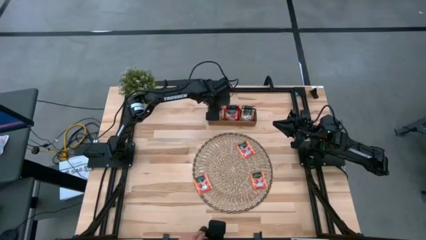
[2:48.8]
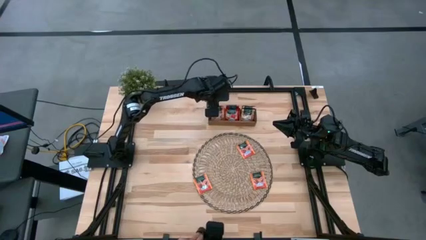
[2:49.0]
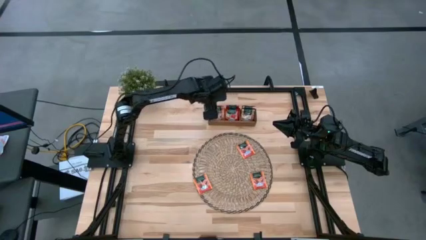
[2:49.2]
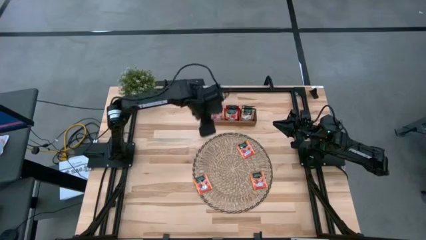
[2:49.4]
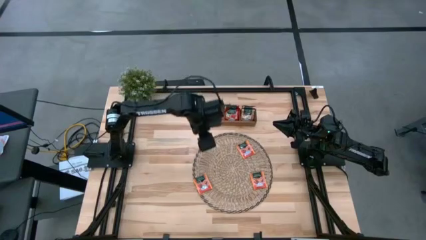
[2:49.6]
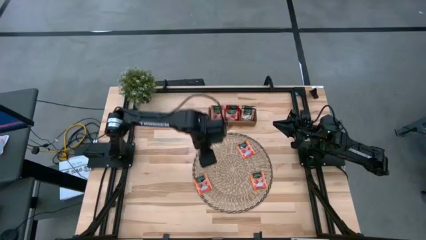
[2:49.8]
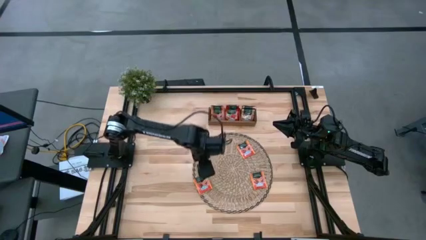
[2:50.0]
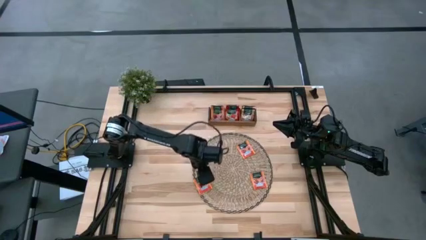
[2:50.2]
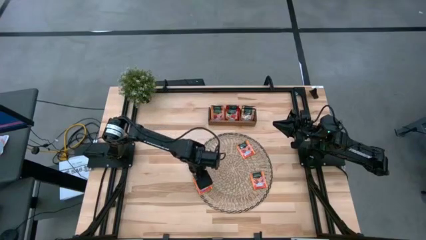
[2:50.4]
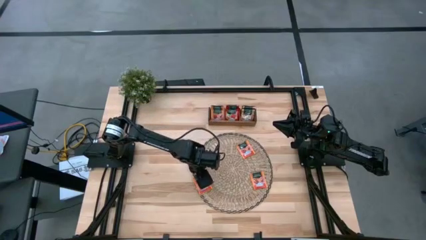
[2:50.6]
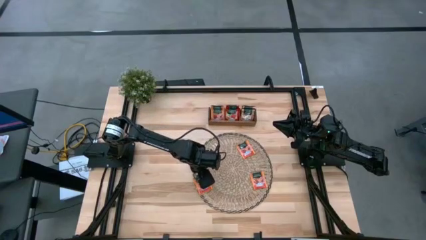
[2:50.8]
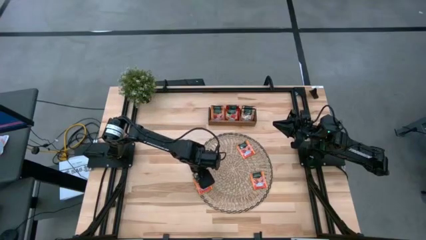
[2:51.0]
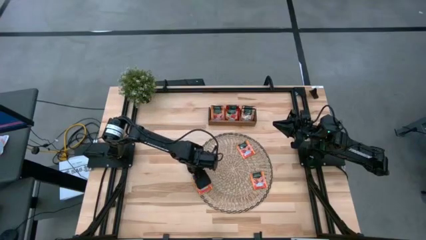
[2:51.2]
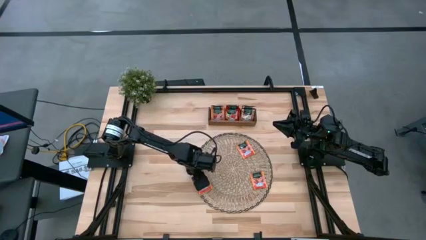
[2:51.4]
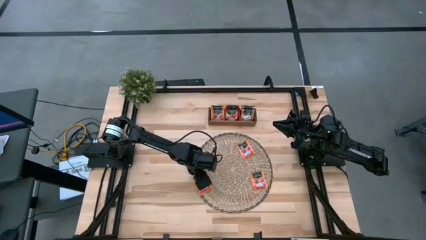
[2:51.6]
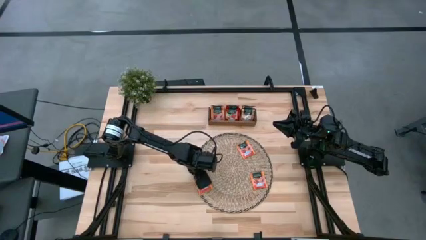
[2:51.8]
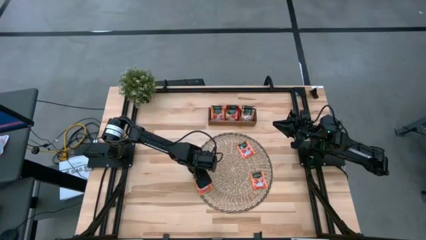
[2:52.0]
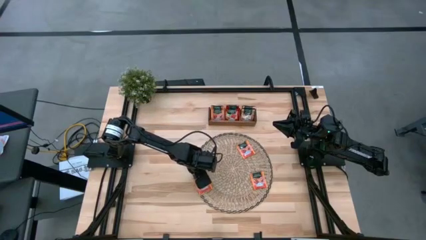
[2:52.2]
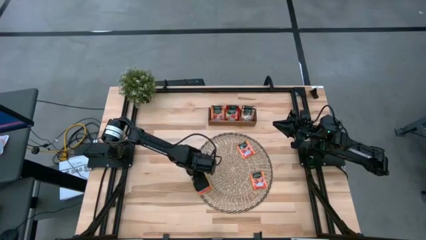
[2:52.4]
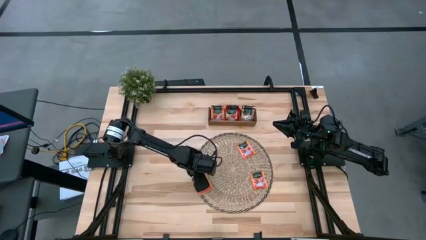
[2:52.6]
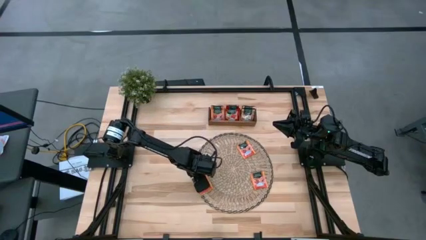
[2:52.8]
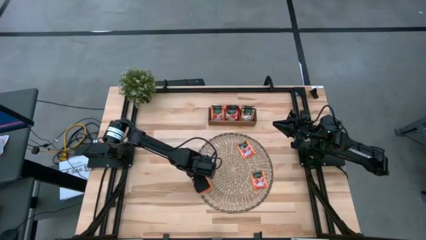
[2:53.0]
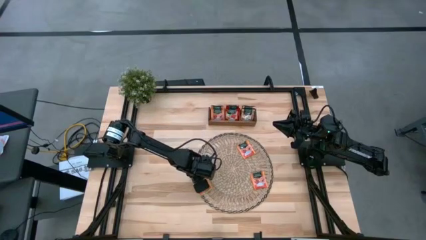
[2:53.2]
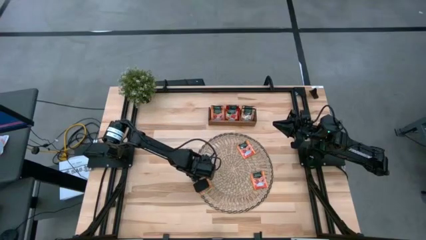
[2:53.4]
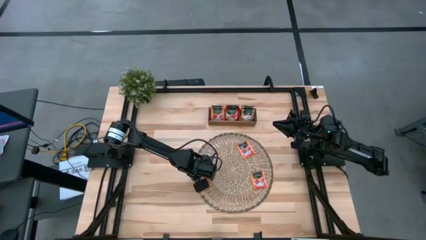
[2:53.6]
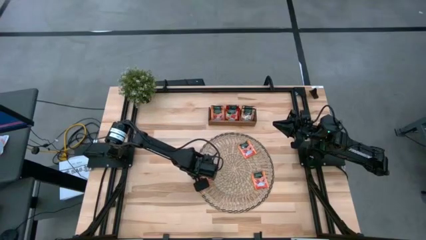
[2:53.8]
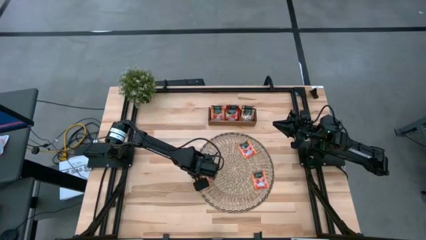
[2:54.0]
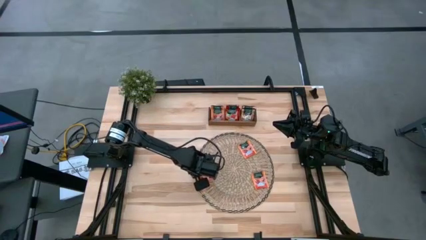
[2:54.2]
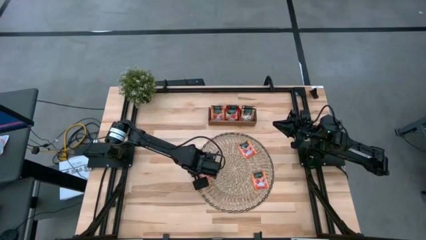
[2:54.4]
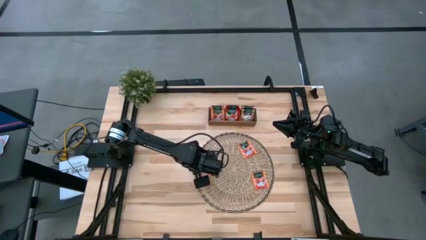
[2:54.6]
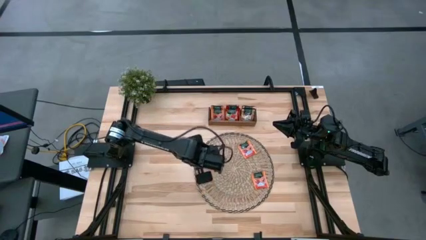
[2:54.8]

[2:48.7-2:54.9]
Task: Pick & Place Tea
Put the bottom left orange tea bag into the left section of the wooden organizer

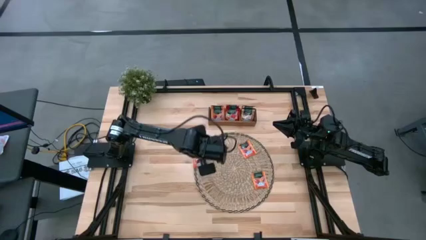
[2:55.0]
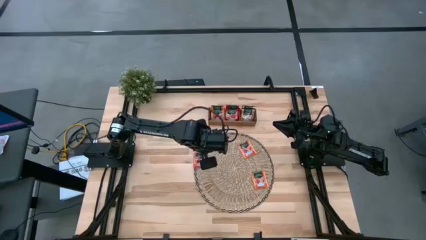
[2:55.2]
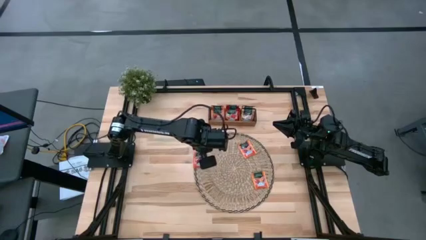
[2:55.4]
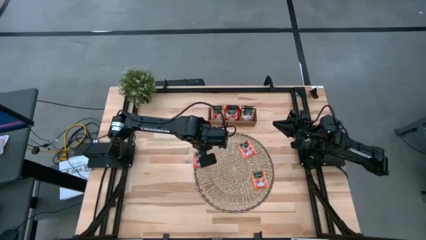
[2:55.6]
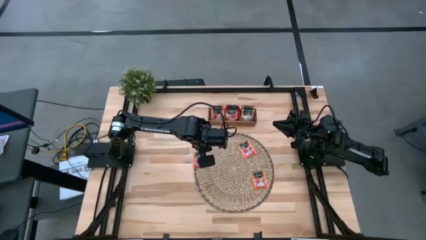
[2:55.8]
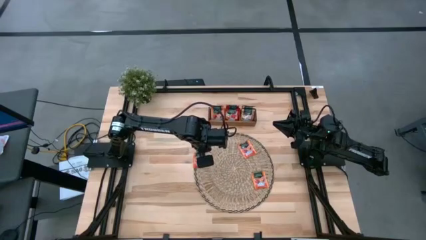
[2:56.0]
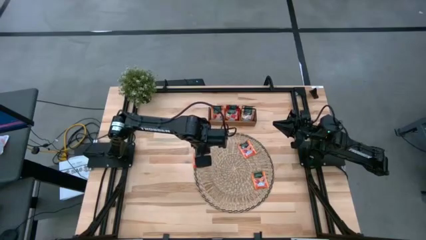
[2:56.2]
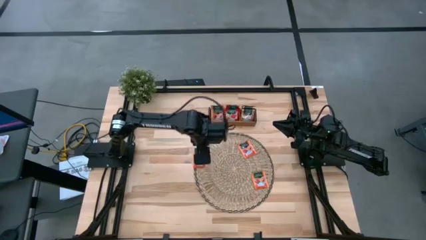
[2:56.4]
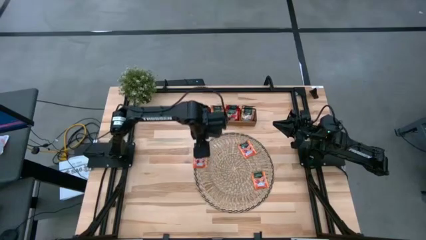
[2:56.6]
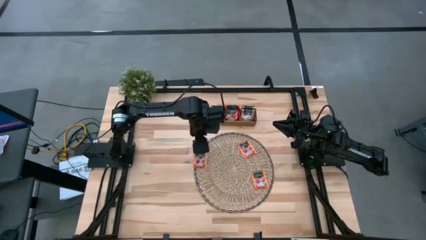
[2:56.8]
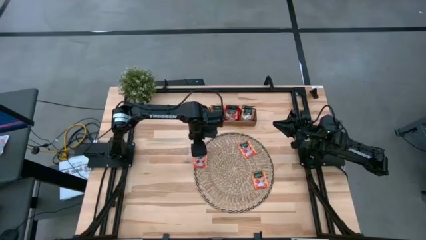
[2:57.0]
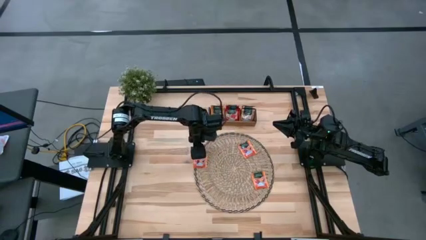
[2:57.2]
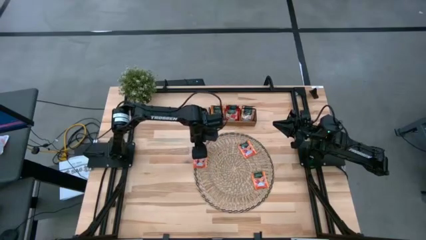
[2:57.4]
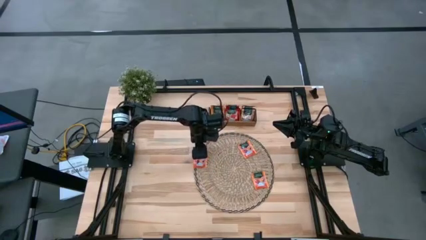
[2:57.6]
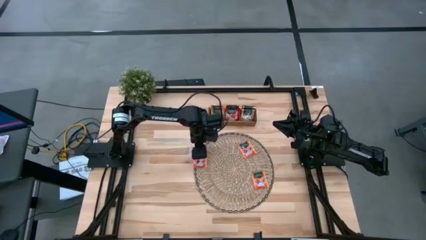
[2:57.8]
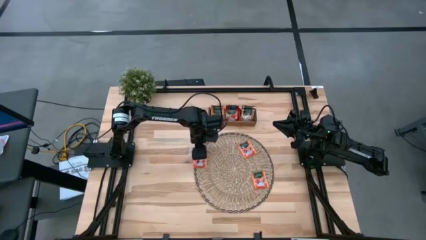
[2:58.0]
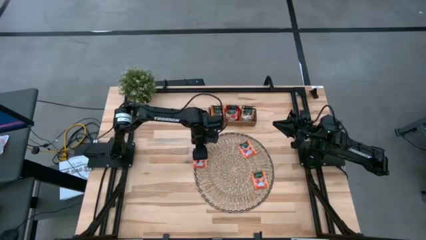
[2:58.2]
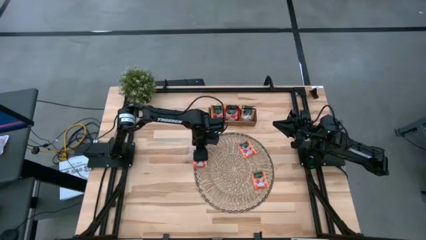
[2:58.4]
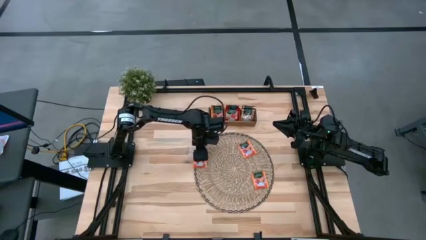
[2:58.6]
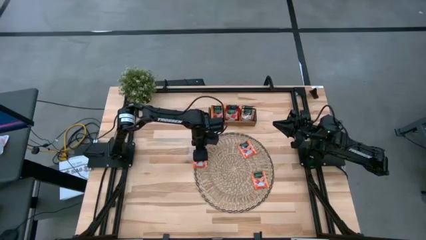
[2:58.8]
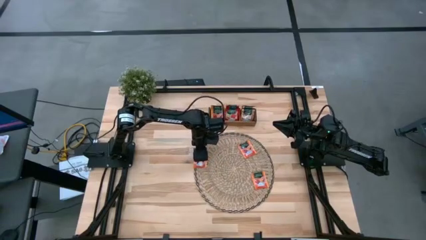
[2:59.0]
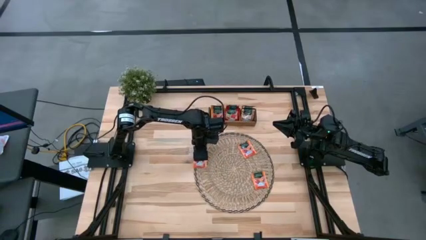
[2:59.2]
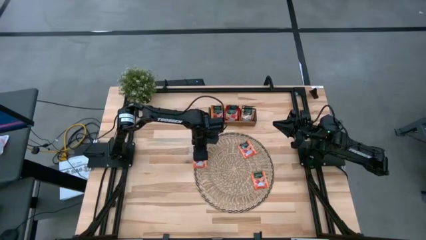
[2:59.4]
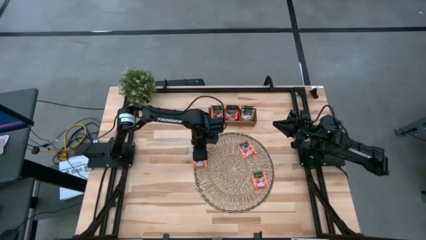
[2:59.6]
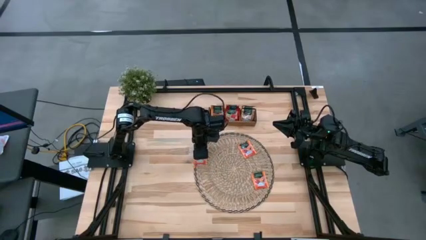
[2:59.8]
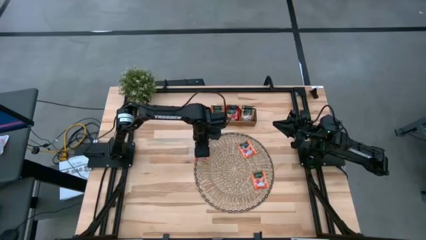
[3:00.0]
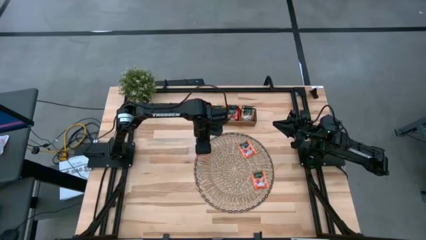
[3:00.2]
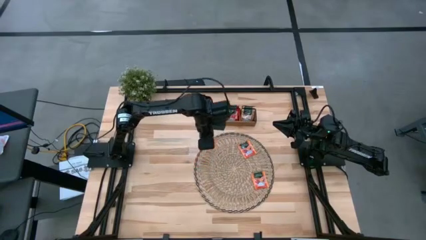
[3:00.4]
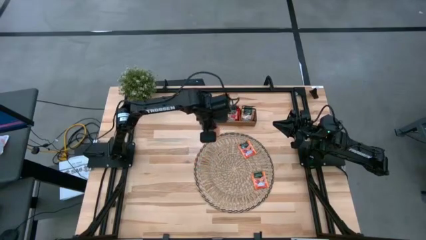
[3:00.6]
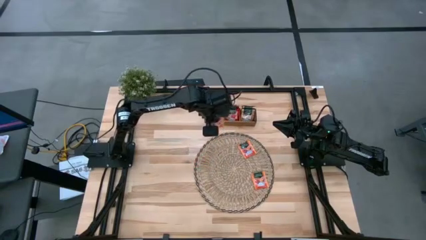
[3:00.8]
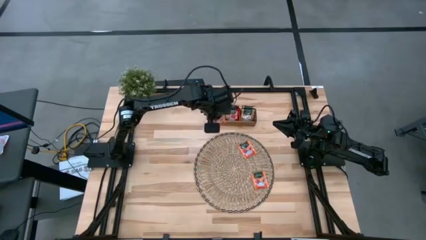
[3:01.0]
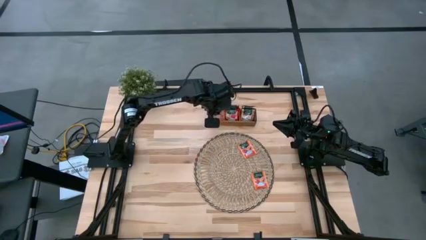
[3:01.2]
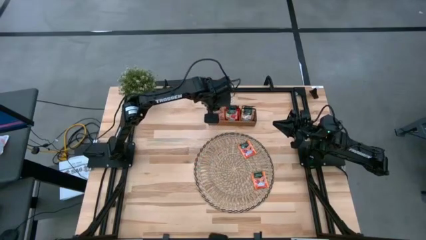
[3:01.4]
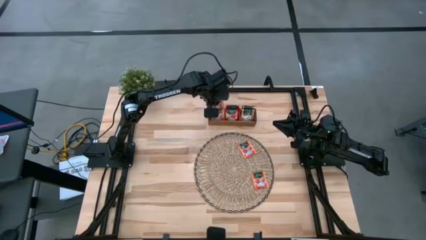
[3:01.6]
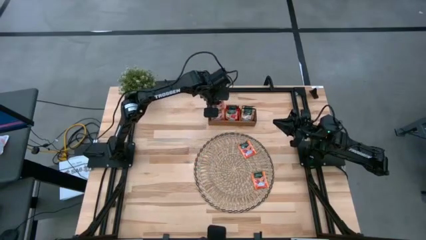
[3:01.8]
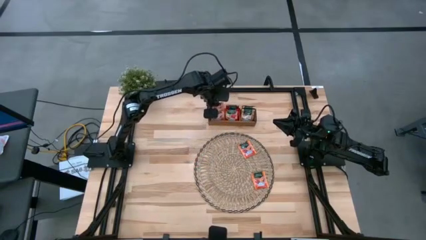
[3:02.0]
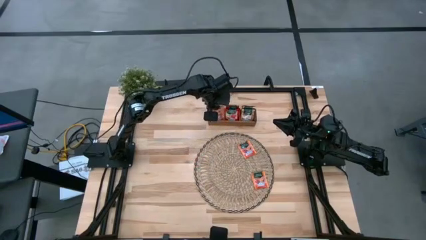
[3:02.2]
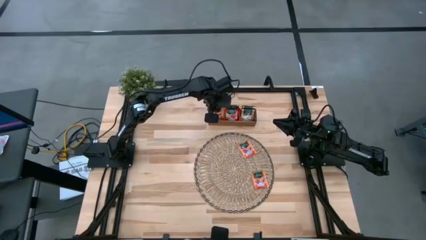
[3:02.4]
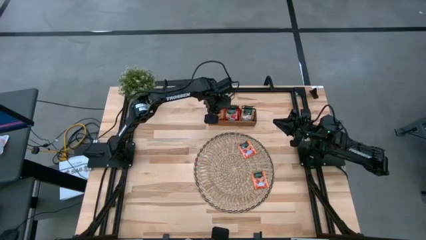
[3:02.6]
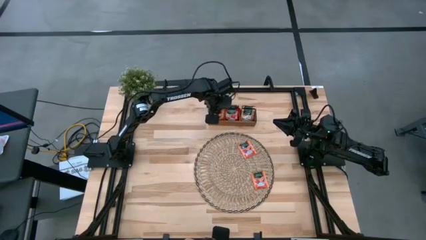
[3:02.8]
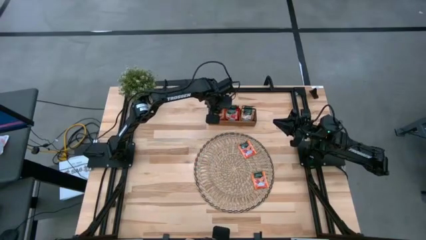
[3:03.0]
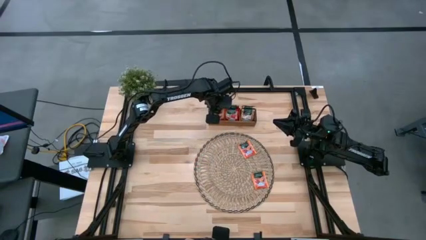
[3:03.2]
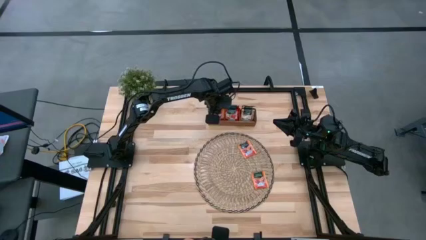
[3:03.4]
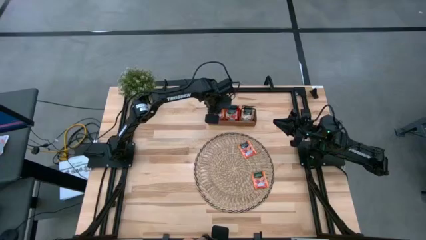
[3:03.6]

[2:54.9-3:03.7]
Put the bottom left orange tea bag into the left section of the wooden organizer
